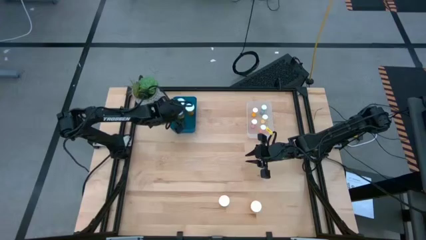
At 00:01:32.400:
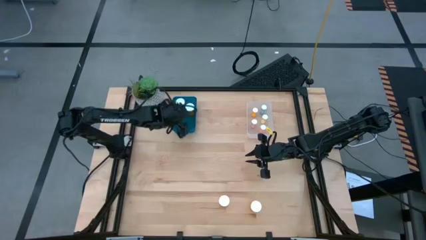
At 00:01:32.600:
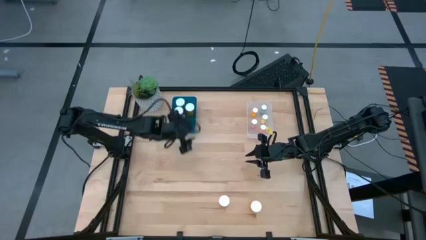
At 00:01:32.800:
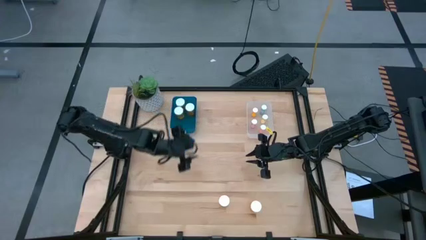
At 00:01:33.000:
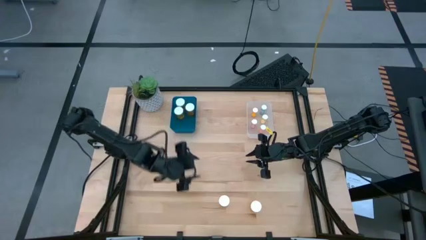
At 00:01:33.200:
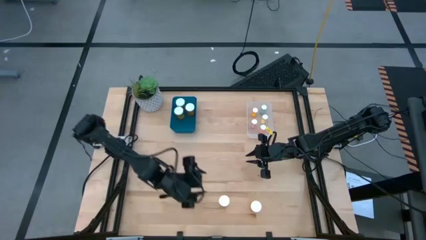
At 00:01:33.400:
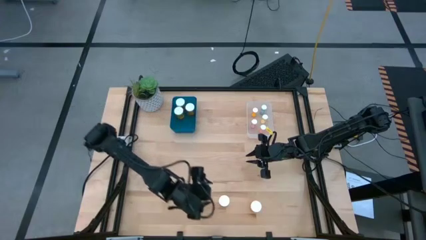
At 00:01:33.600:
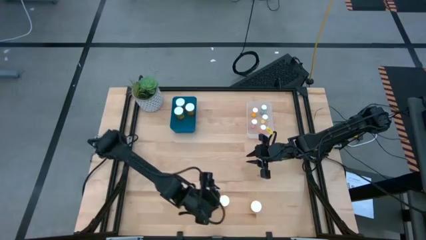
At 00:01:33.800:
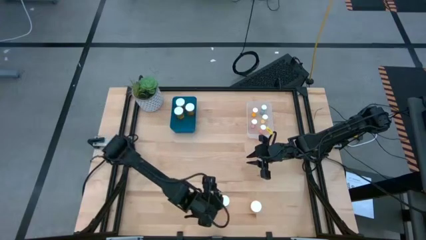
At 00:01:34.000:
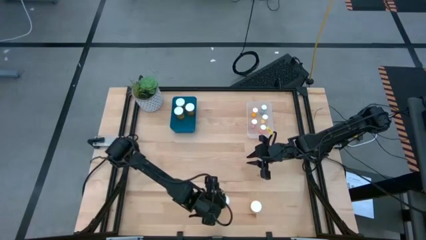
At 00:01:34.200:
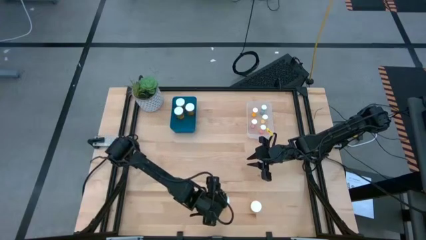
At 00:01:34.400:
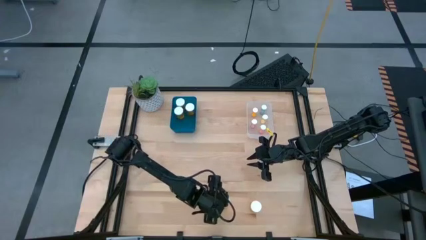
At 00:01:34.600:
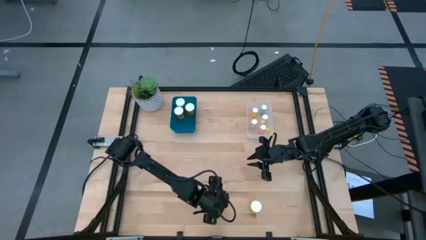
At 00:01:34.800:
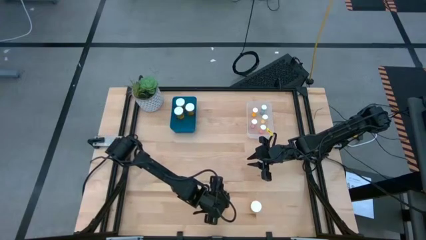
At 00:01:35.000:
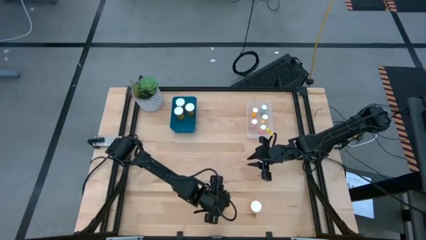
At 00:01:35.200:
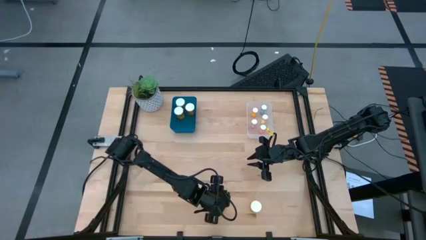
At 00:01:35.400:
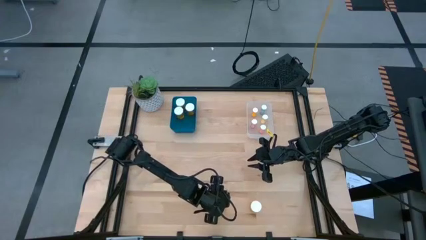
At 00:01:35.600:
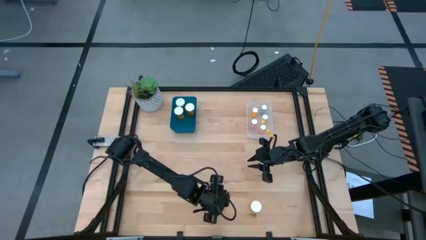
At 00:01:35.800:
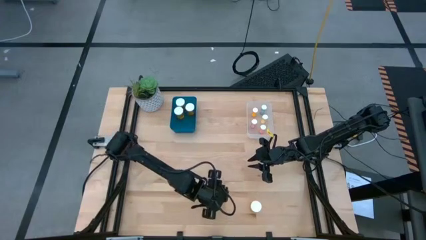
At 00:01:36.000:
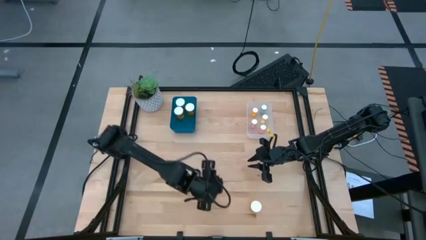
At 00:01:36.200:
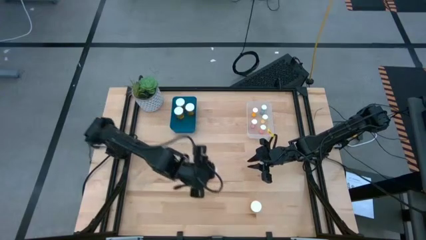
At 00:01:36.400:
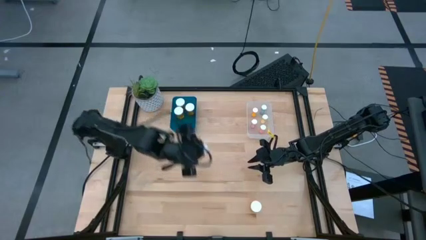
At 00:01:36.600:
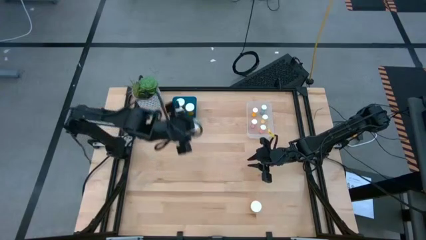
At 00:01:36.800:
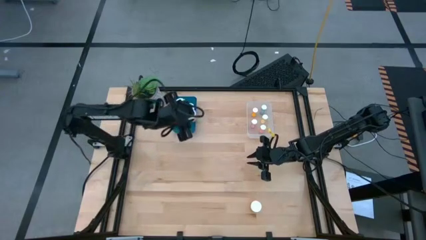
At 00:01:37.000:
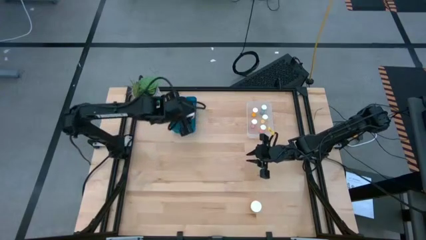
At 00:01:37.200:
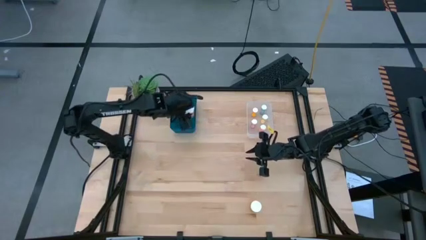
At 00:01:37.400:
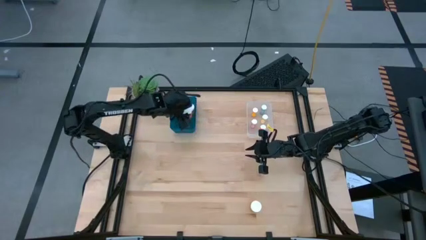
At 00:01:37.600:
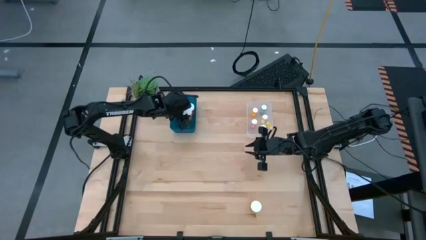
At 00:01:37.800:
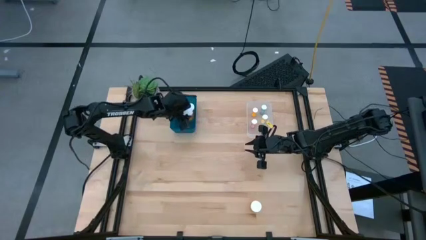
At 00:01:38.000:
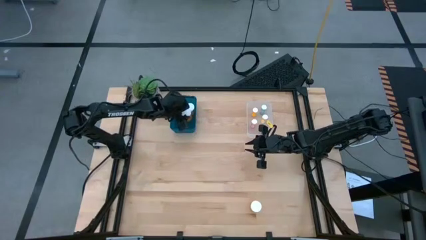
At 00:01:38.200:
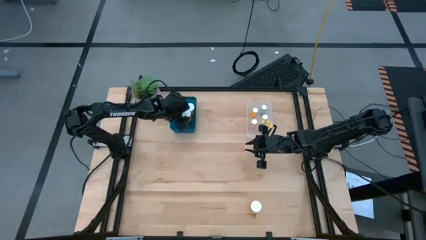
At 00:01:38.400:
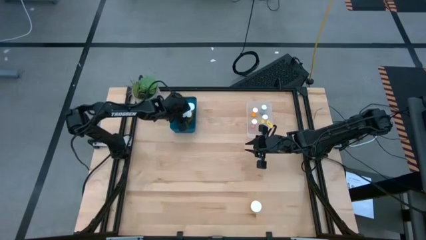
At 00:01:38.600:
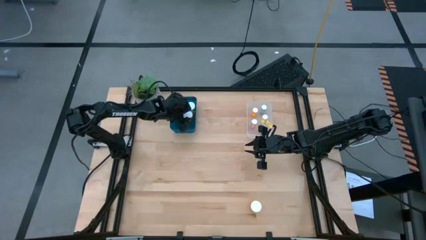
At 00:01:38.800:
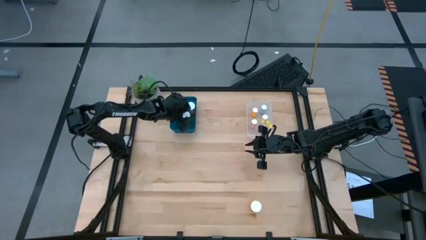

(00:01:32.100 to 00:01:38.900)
Task: Pick and place medicine bottles into bin by pill shape (circle, oval)
Put the large orange pill bottle into the blue bin

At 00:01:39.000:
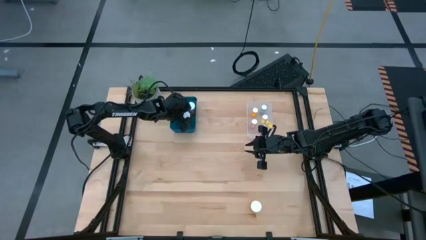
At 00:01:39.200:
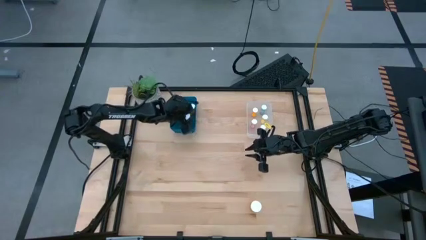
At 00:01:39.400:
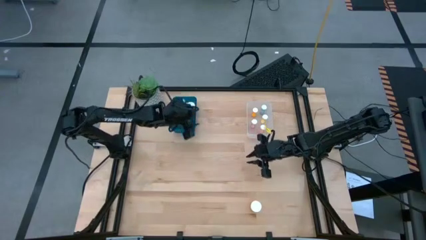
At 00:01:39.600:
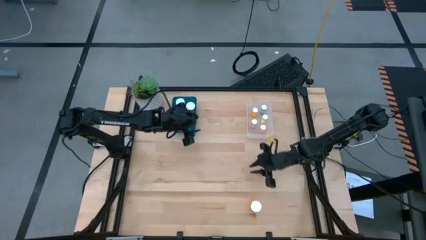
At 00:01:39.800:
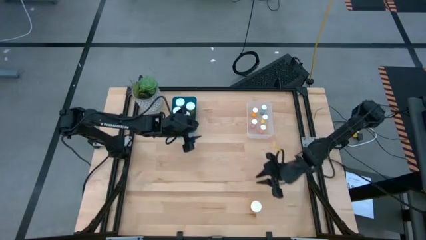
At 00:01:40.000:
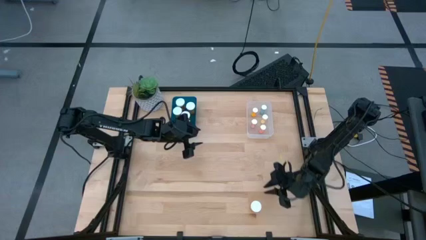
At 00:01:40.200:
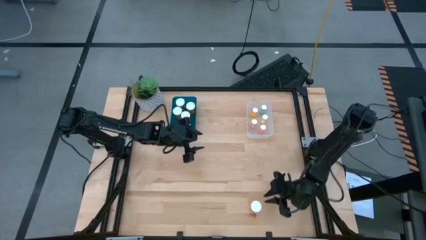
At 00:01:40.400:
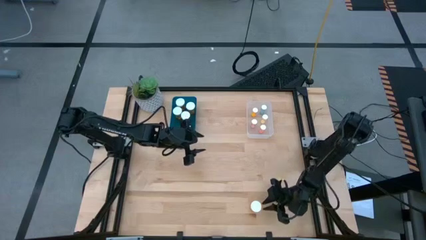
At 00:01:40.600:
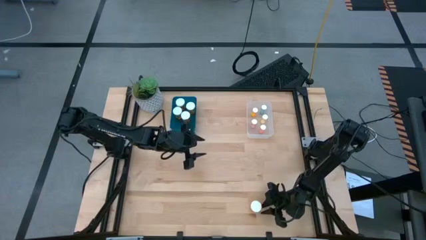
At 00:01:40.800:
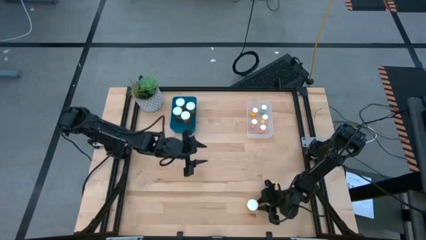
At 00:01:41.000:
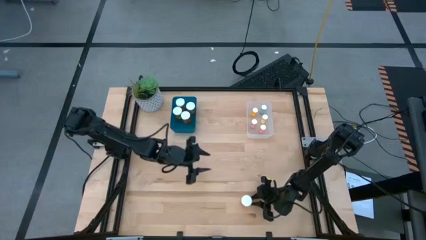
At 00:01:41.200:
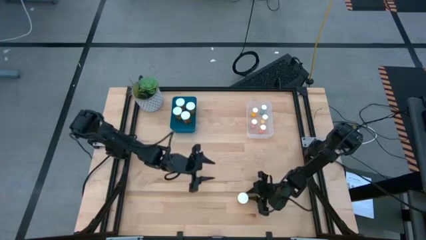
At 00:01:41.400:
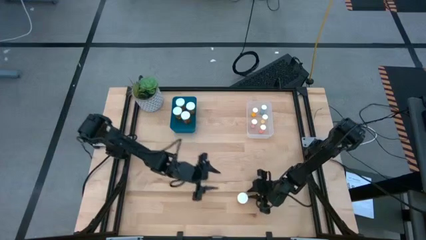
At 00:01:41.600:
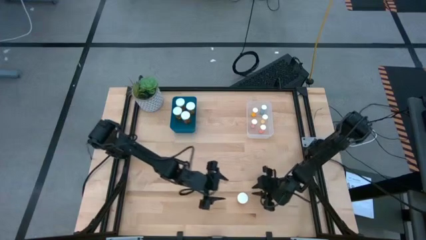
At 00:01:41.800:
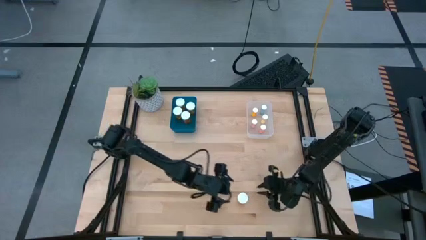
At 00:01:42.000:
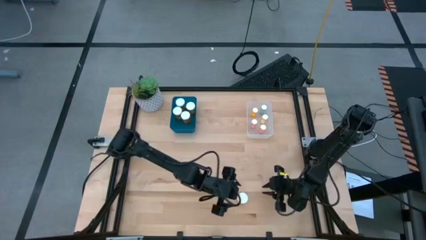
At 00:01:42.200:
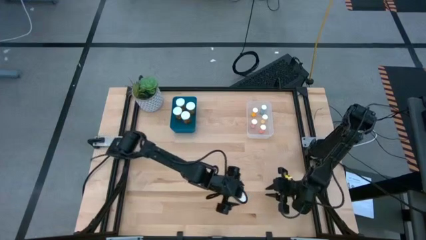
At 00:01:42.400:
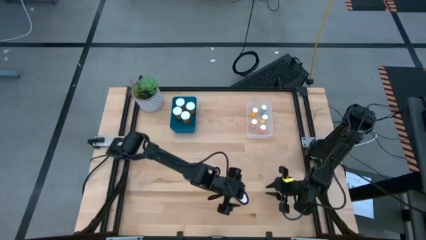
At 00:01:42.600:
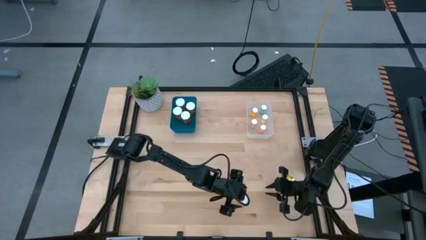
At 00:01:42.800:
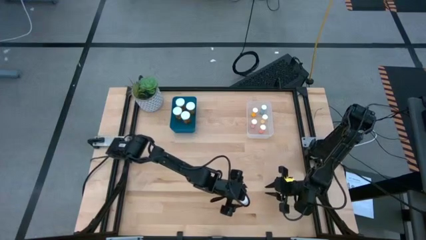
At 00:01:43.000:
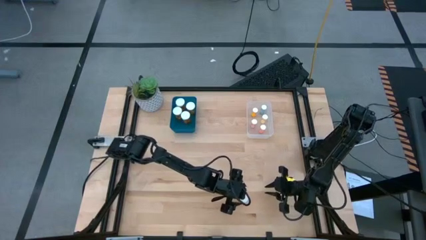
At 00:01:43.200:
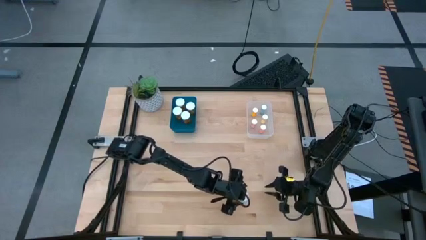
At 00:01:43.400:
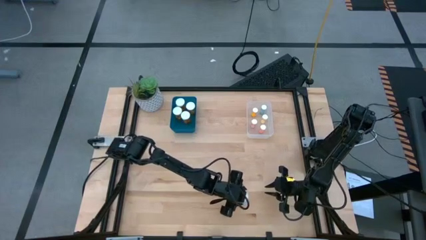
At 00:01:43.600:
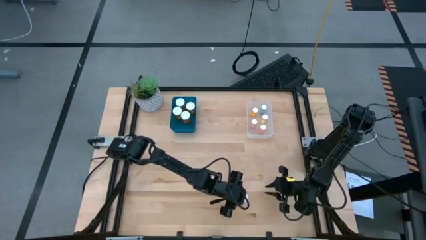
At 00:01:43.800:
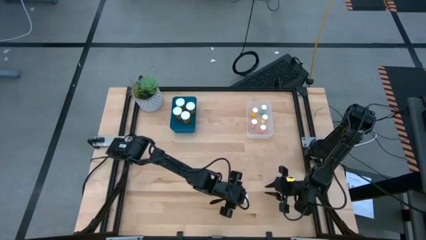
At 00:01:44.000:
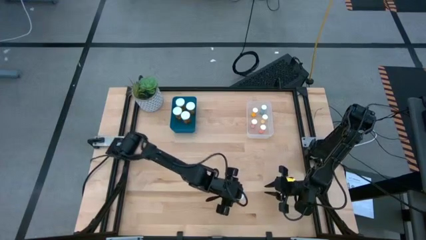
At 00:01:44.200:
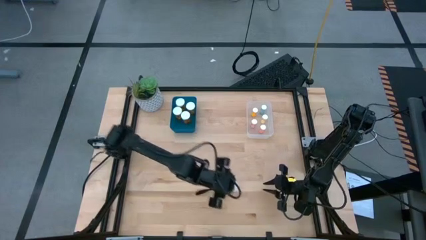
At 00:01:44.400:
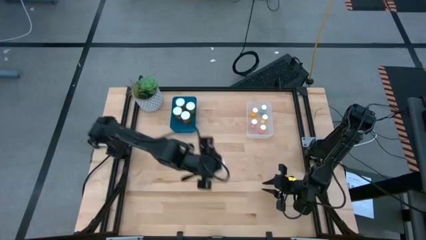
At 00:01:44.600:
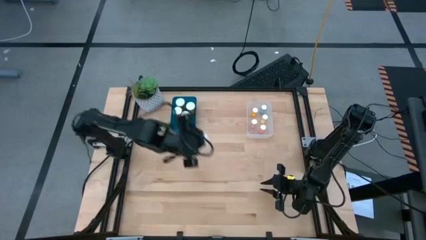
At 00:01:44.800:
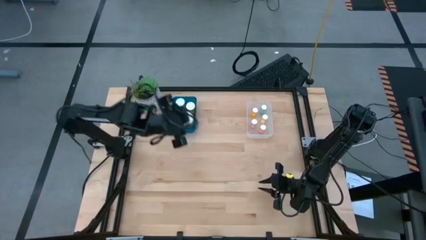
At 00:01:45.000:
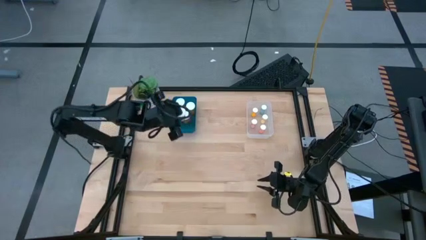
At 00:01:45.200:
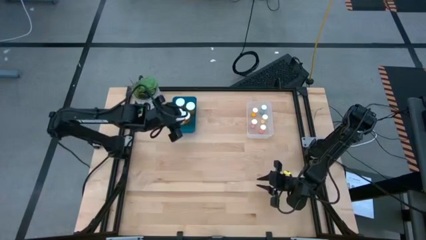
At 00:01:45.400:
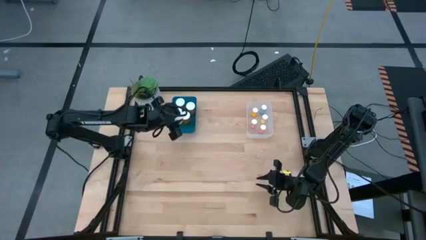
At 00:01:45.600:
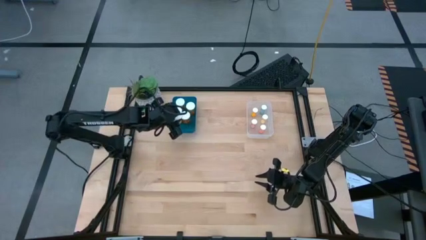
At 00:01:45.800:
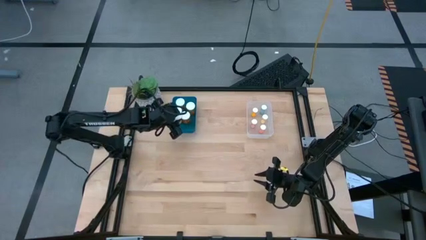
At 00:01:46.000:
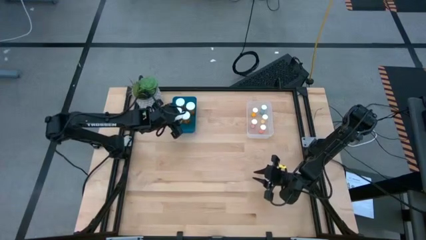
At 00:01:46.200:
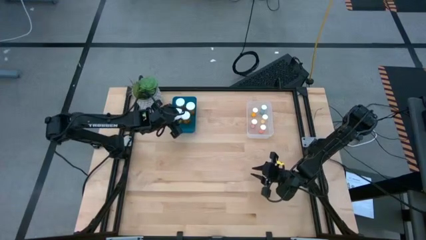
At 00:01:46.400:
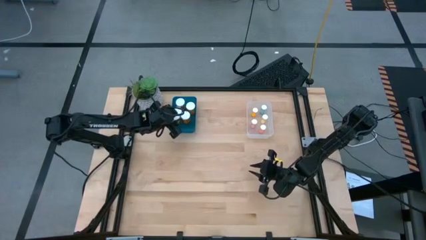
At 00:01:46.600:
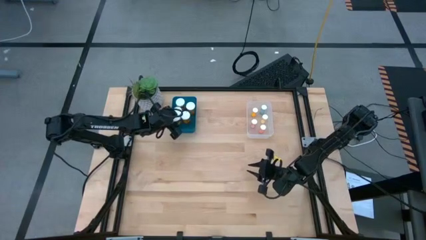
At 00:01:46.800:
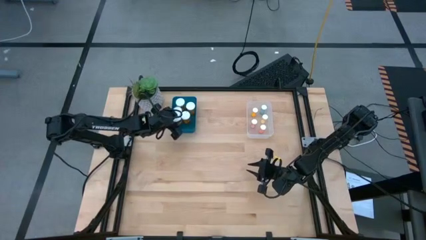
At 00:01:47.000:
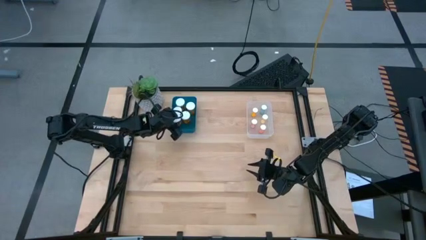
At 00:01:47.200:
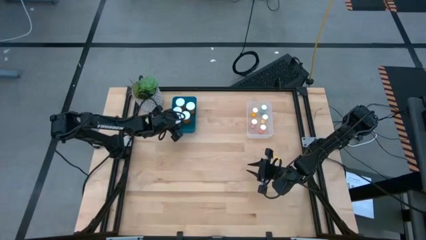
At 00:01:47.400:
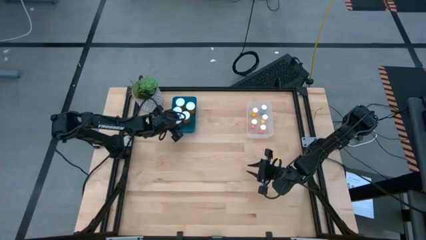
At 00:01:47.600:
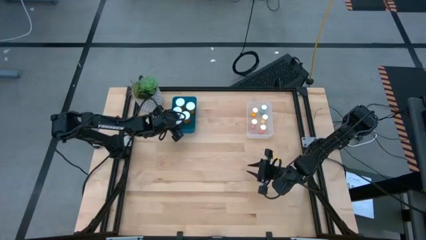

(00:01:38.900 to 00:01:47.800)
Put the large orange pill bottle into the blue bin
